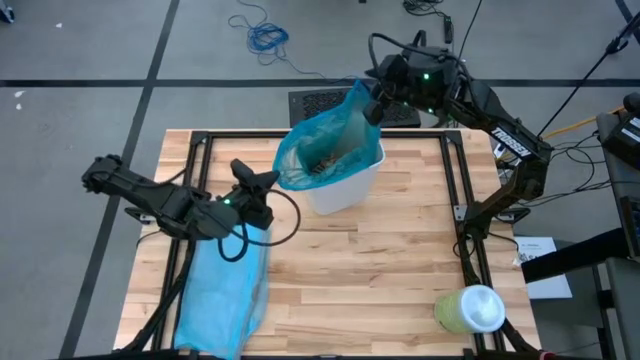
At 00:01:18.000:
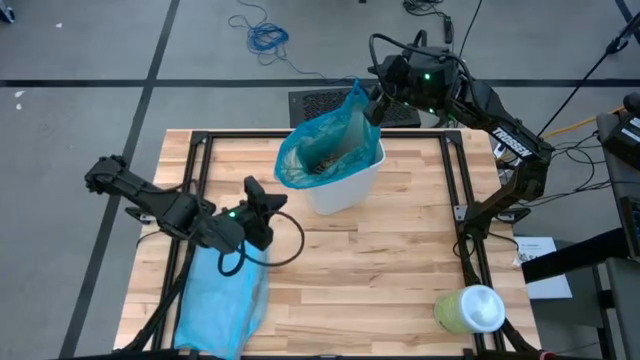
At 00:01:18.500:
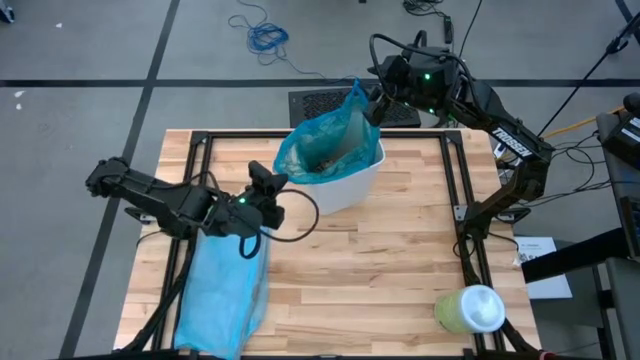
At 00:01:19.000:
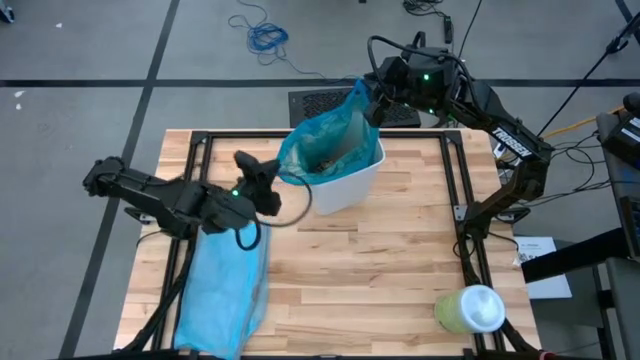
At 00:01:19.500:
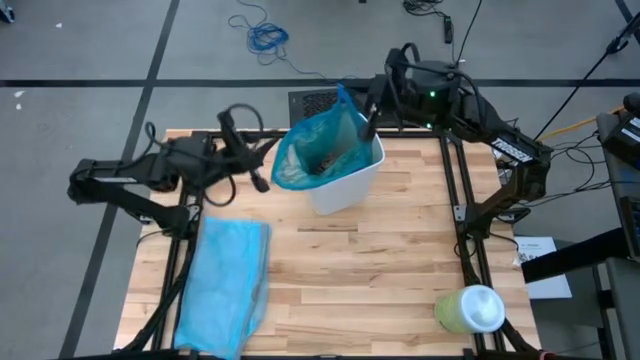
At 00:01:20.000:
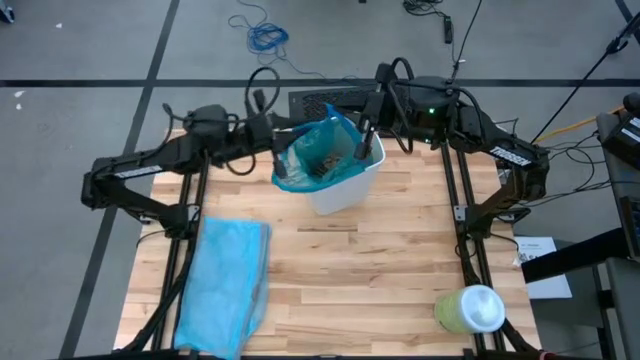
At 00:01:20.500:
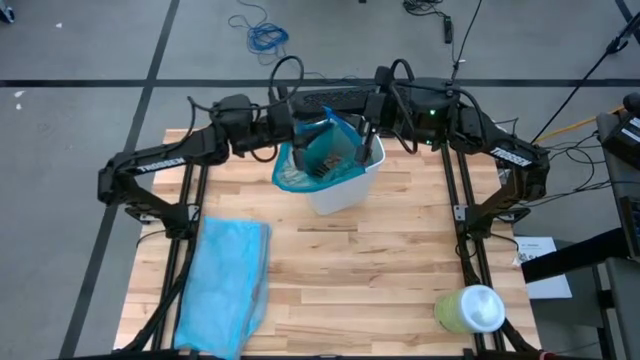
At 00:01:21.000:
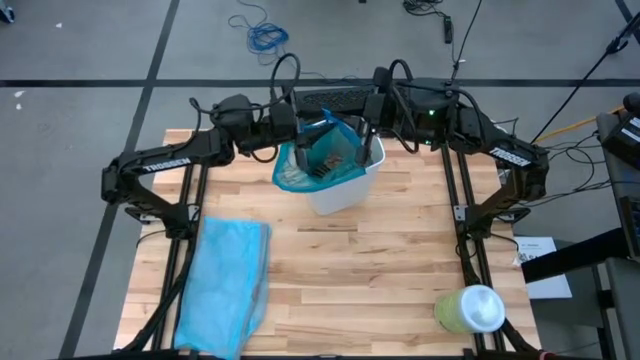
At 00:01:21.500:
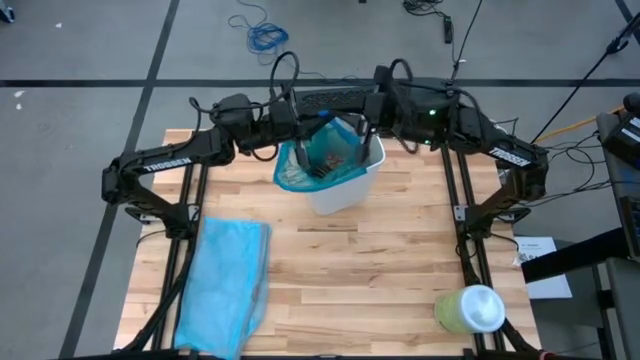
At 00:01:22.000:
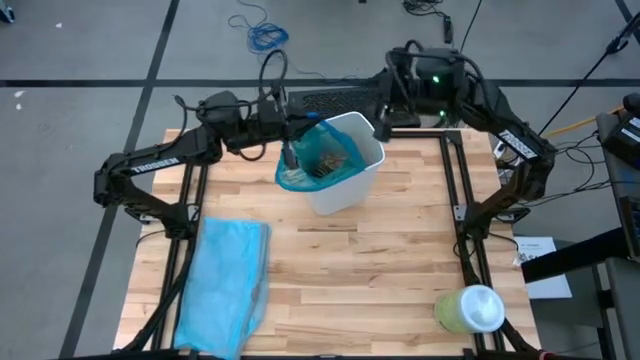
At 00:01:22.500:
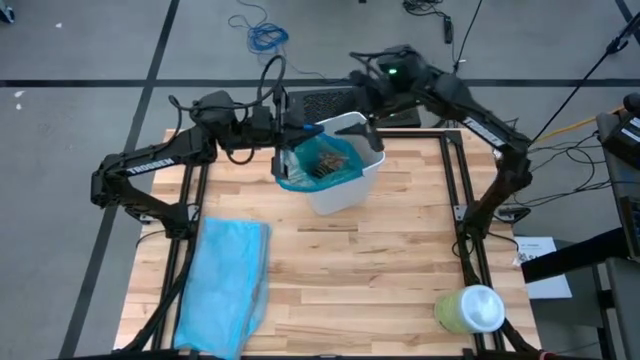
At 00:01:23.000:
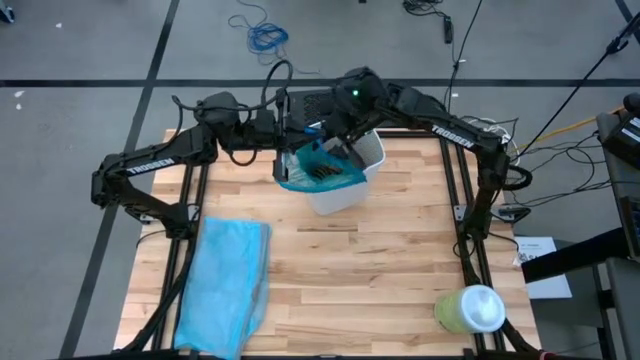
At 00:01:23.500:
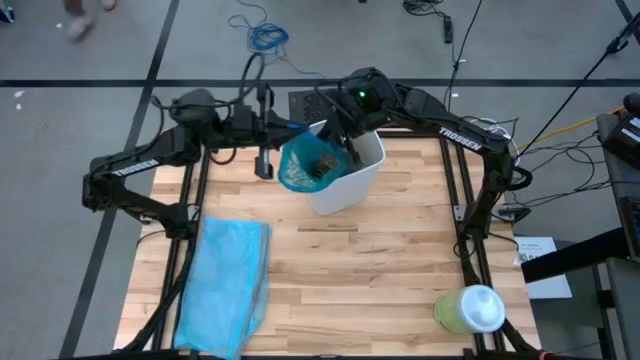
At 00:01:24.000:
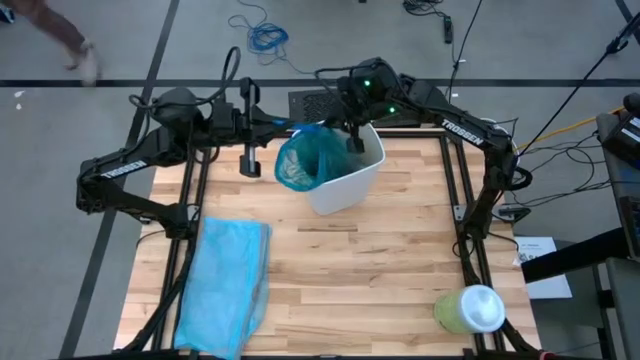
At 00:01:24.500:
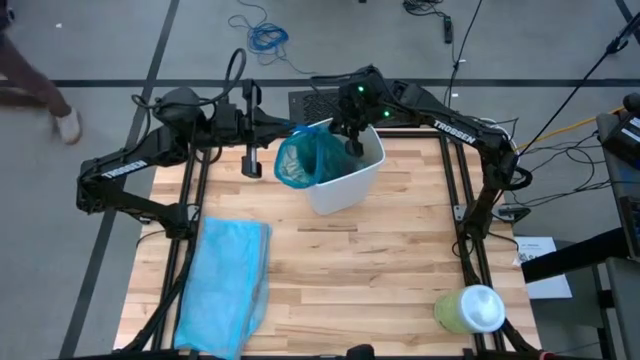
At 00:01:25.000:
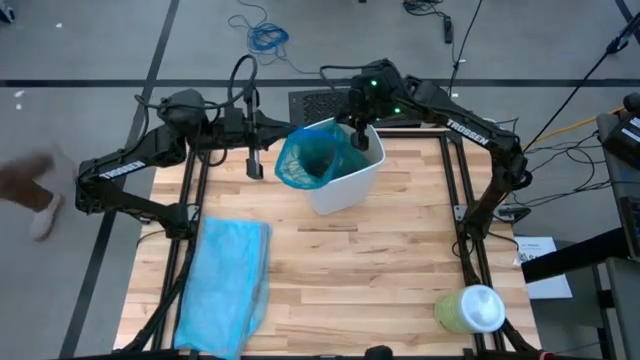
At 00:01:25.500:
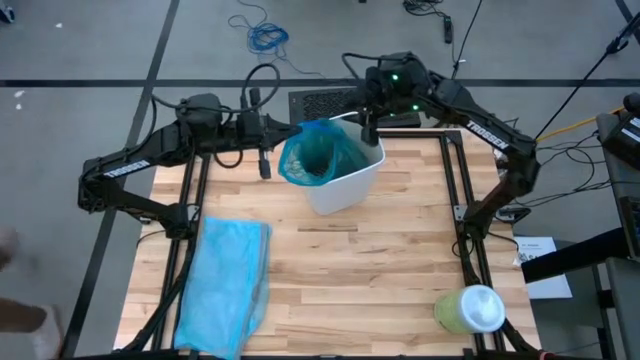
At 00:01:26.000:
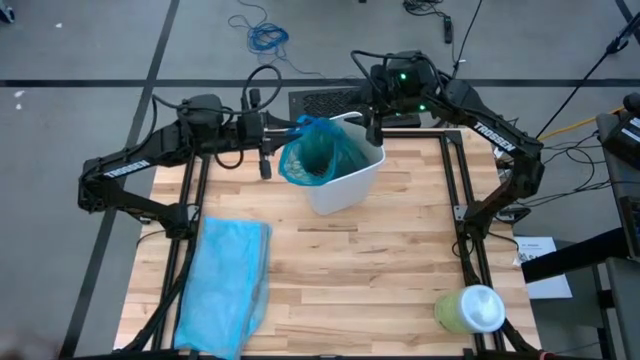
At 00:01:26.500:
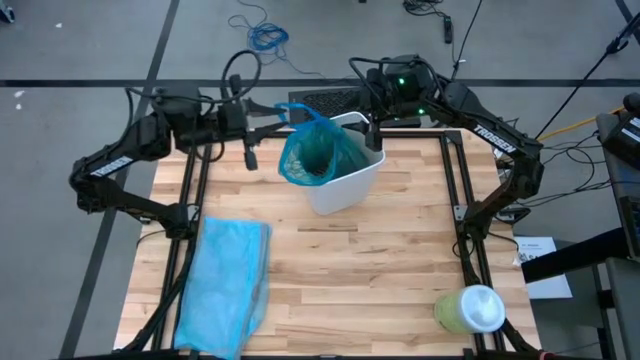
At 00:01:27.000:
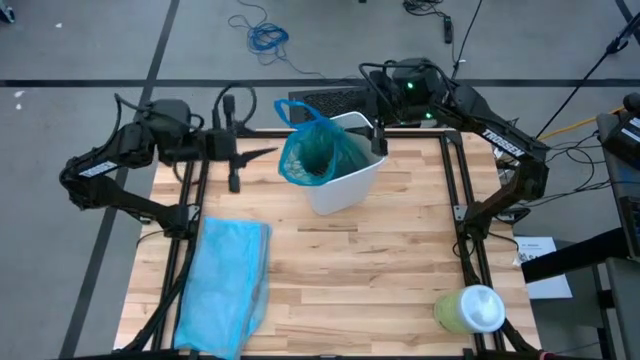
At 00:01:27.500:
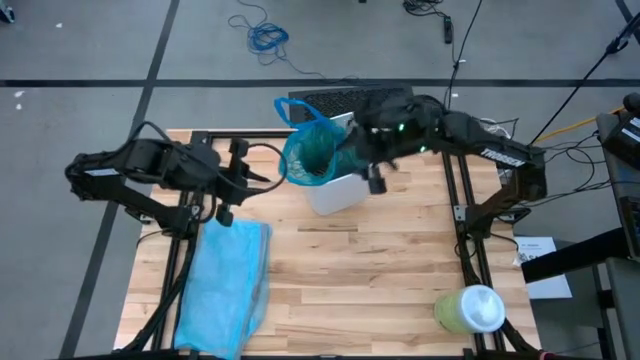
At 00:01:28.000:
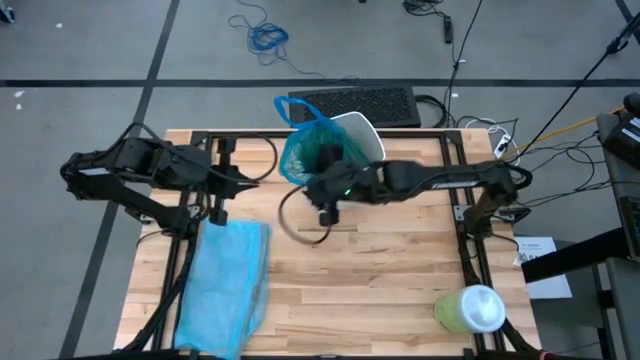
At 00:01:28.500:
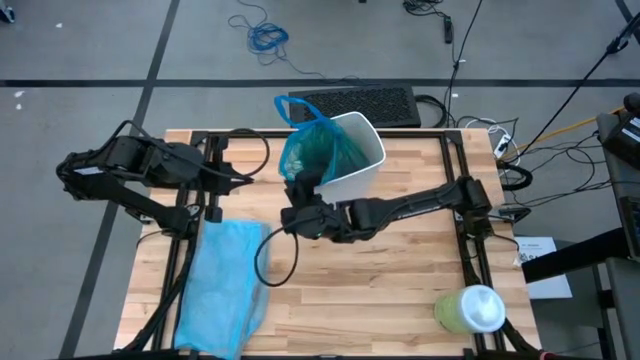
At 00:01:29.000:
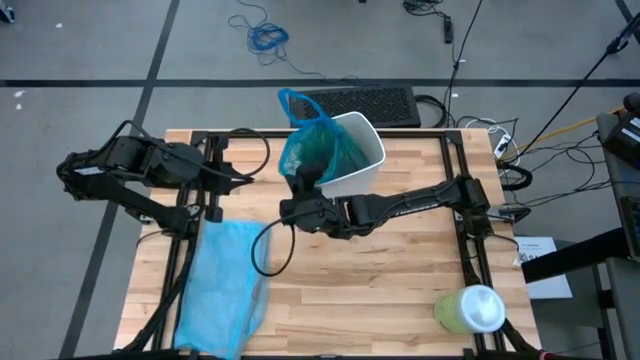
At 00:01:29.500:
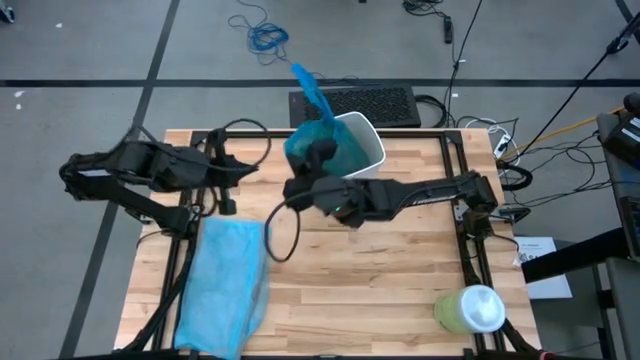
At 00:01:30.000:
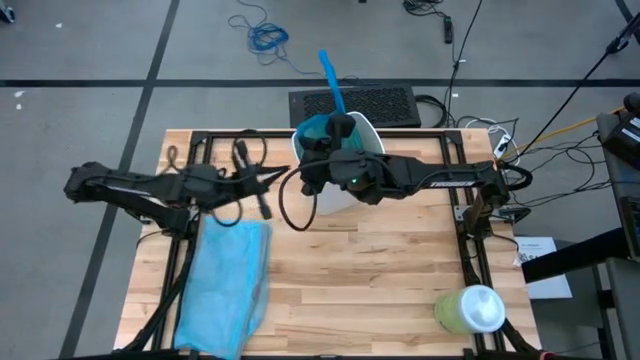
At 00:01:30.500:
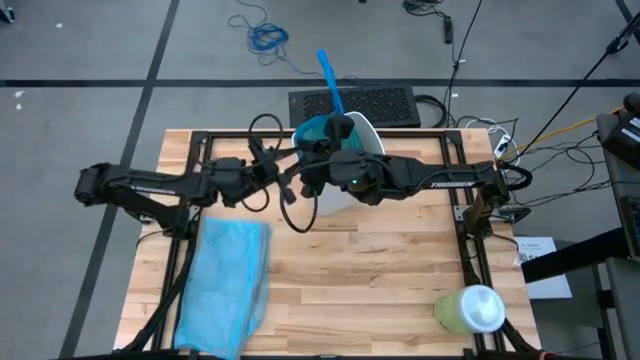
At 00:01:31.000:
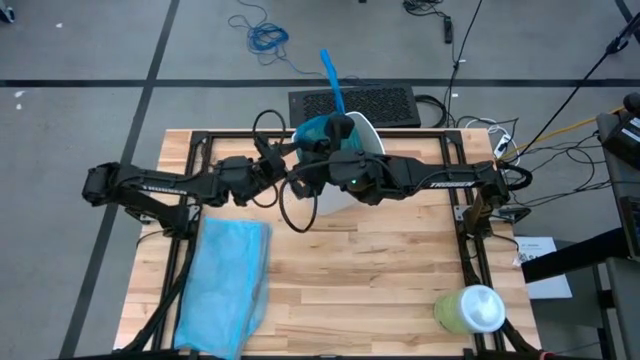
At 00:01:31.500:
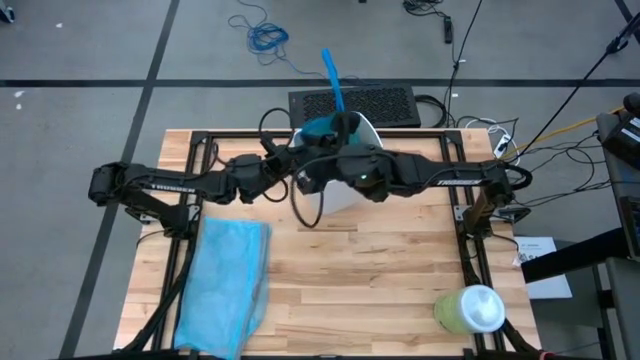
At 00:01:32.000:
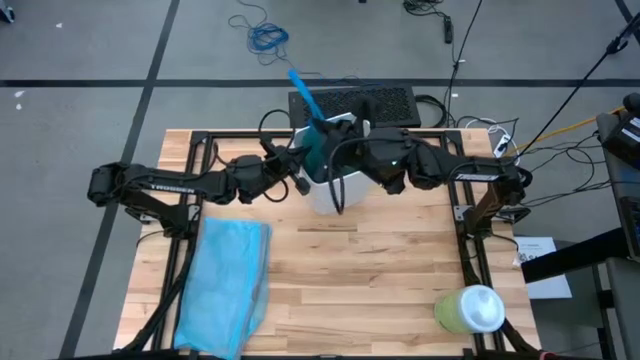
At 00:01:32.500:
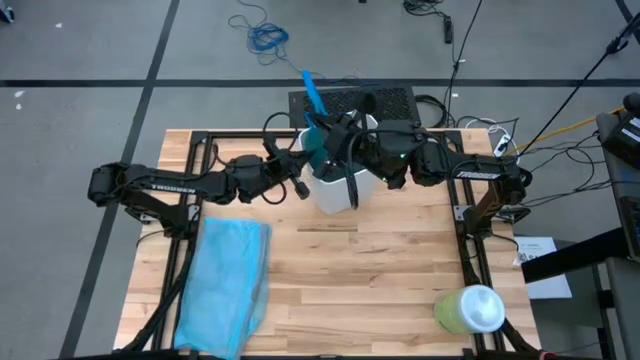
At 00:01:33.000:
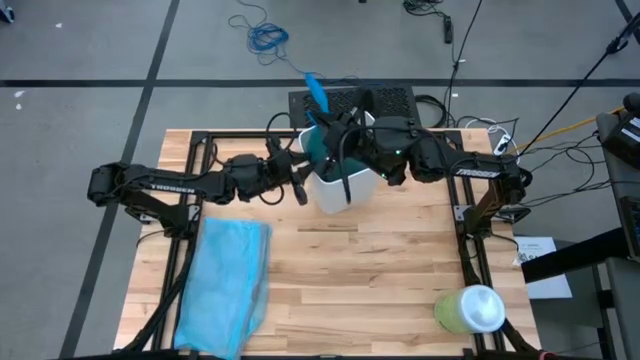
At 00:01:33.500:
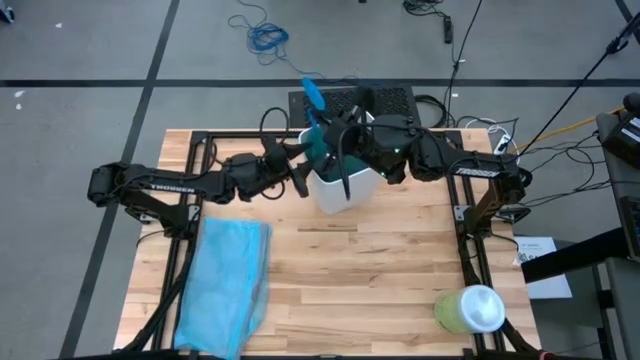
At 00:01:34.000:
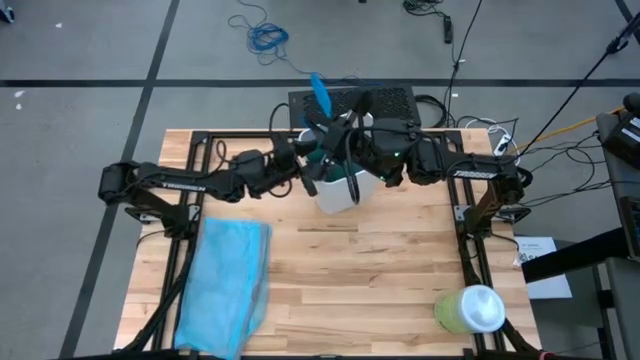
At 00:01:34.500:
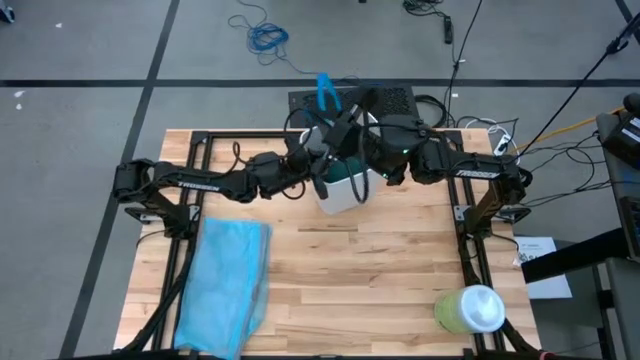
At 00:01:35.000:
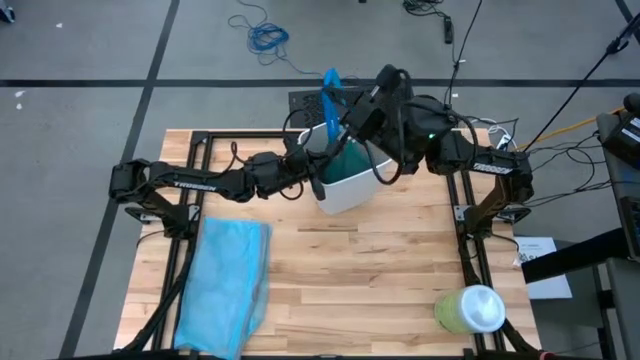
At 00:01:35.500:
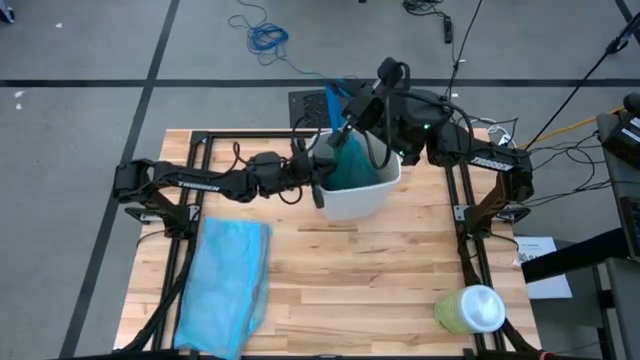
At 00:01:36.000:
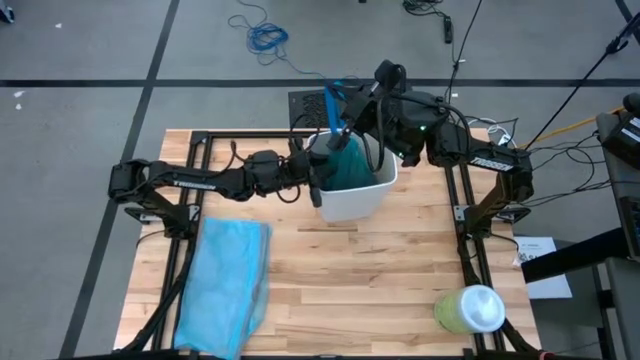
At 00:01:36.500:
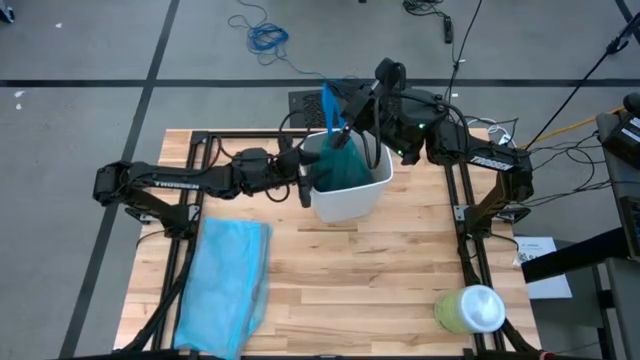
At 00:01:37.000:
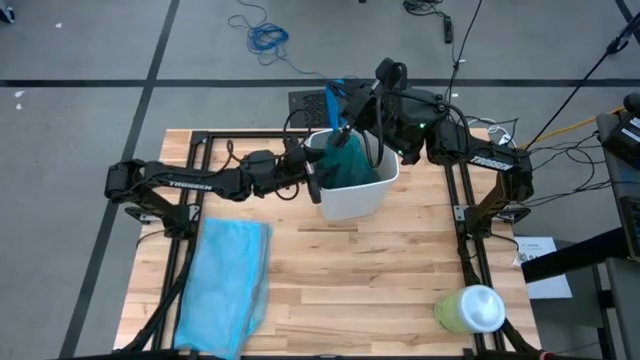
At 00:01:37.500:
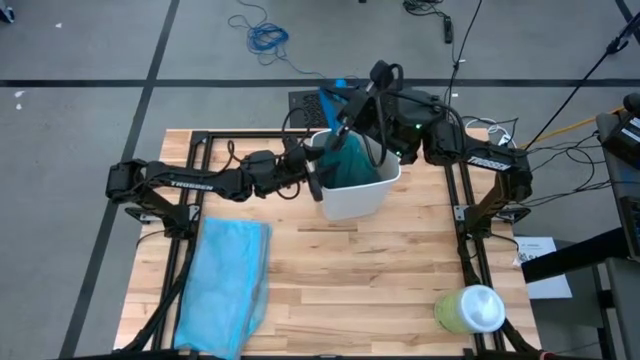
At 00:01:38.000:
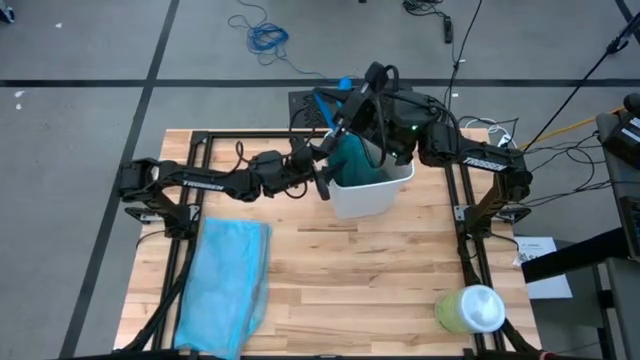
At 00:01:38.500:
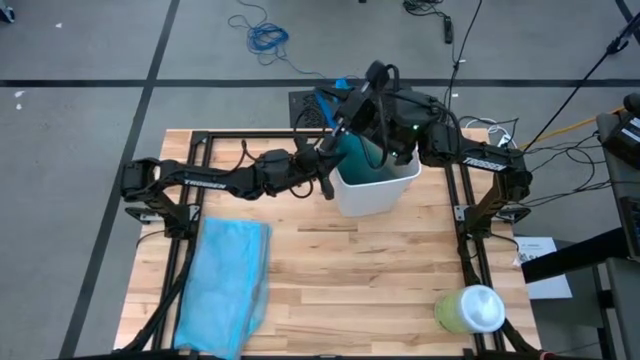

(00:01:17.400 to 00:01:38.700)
Task: place trash/remove bag and relplace
Close the trash bag
